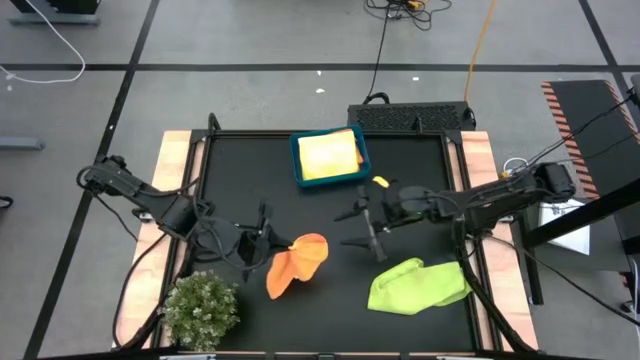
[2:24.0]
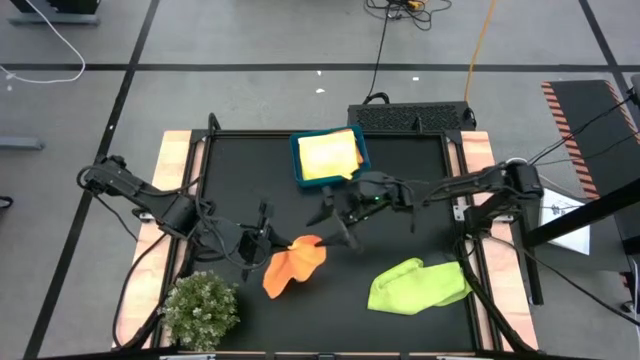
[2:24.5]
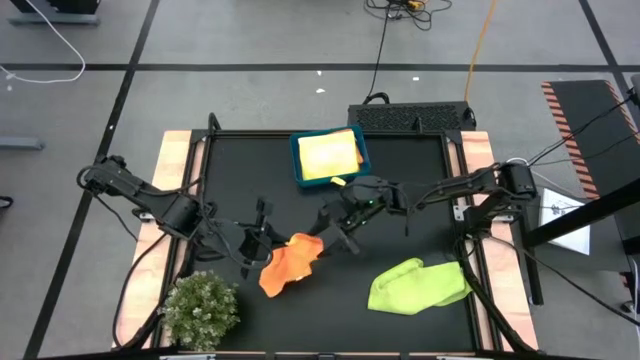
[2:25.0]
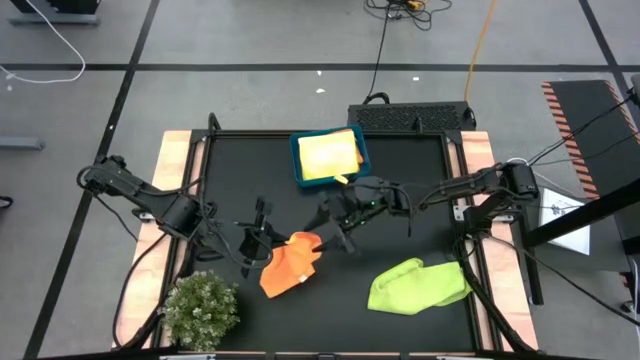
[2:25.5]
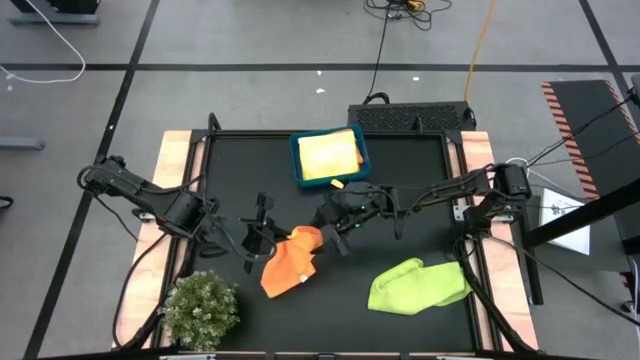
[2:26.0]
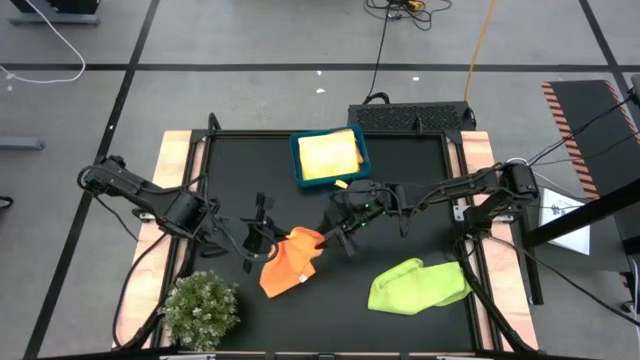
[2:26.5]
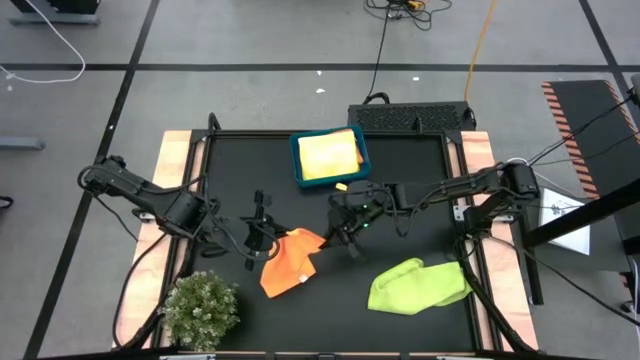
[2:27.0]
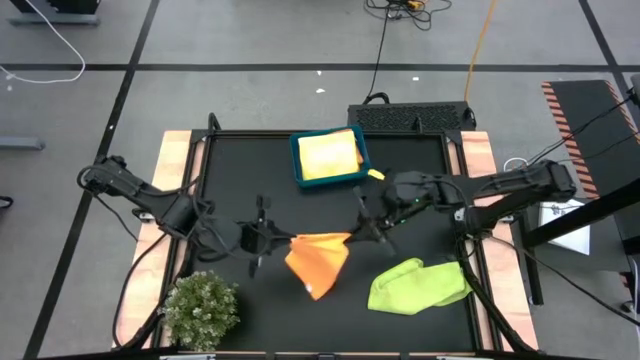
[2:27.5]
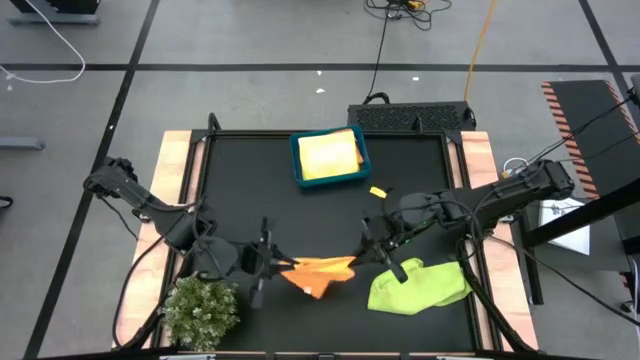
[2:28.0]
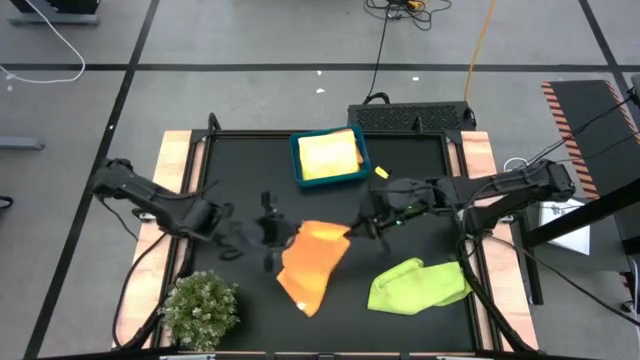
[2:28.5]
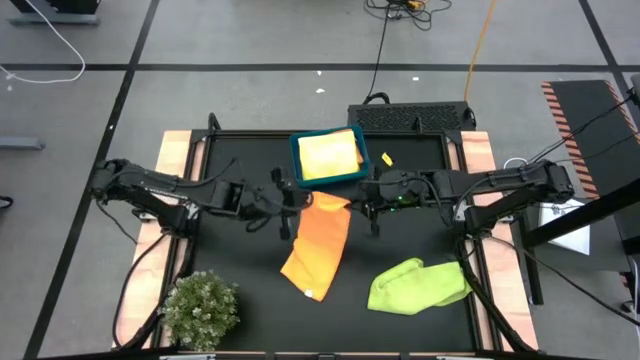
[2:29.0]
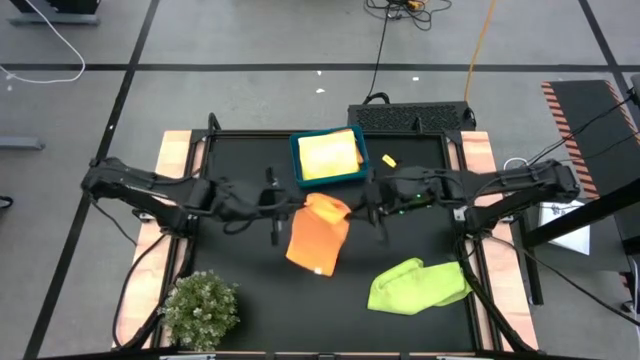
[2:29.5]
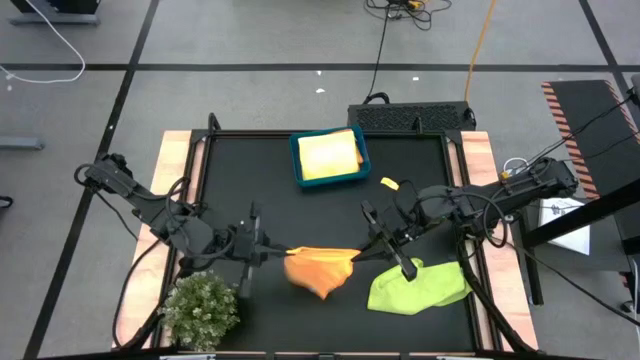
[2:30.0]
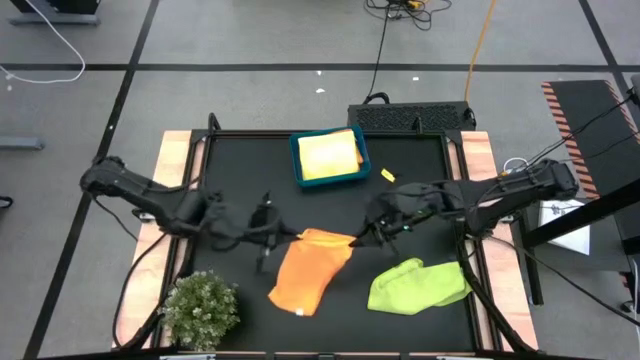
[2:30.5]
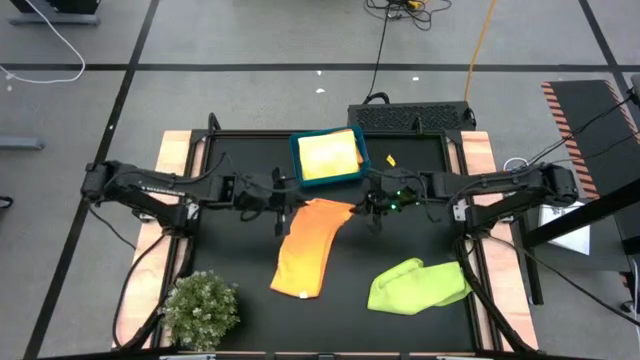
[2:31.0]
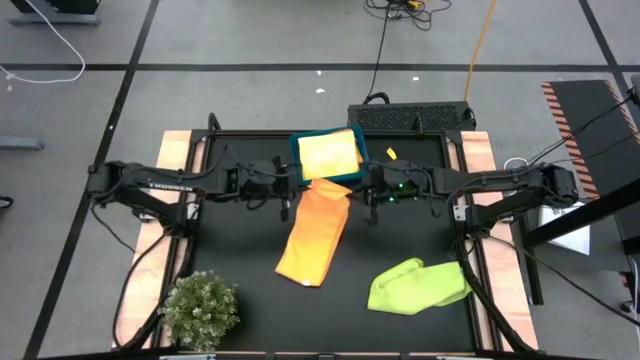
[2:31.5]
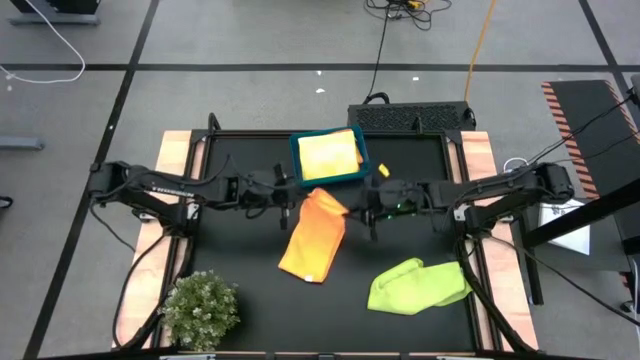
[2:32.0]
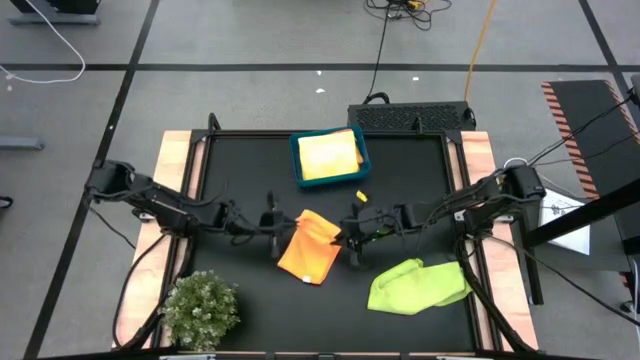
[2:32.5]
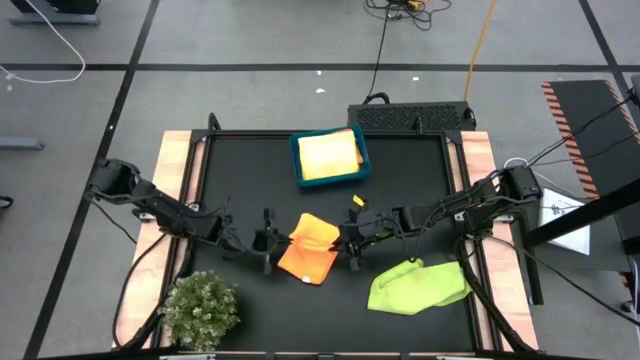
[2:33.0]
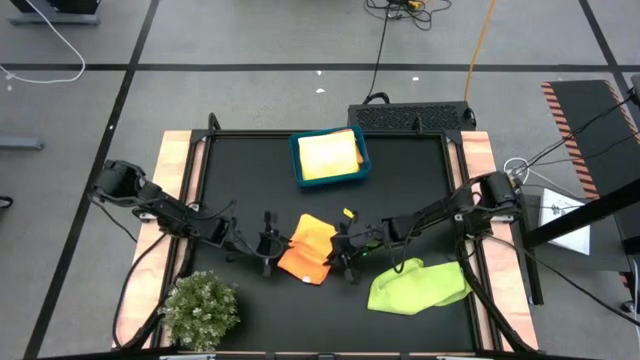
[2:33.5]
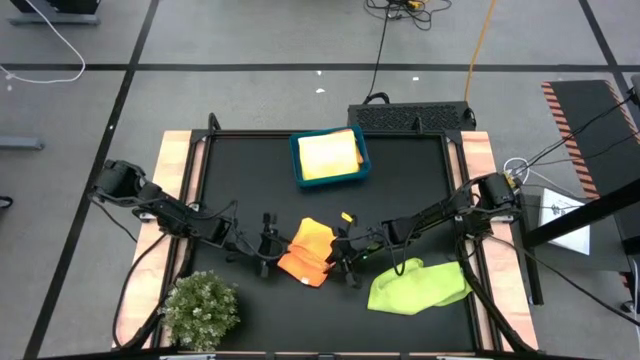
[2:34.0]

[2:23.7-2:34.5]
Task: Fold microfiber towels
Fold the orange microfiber towel

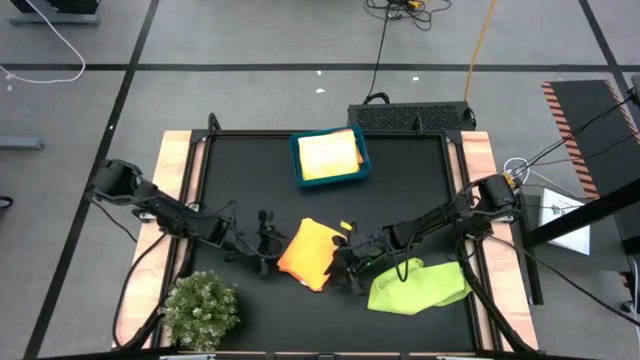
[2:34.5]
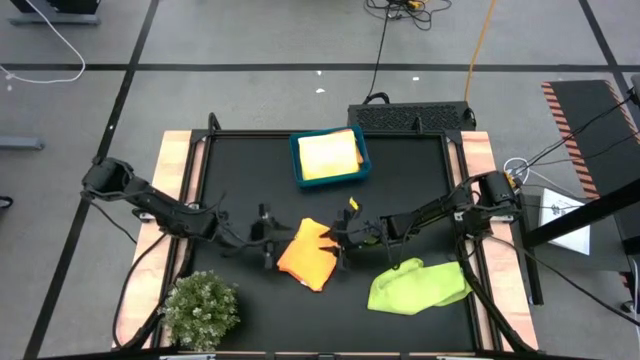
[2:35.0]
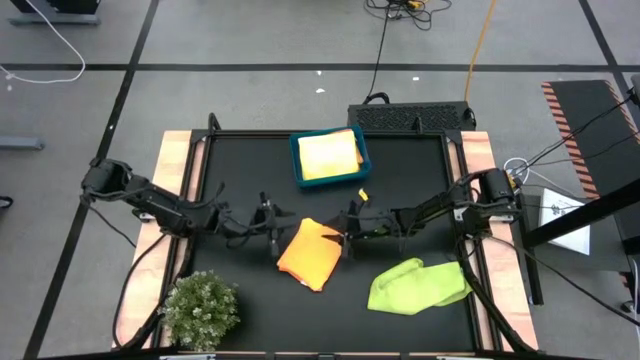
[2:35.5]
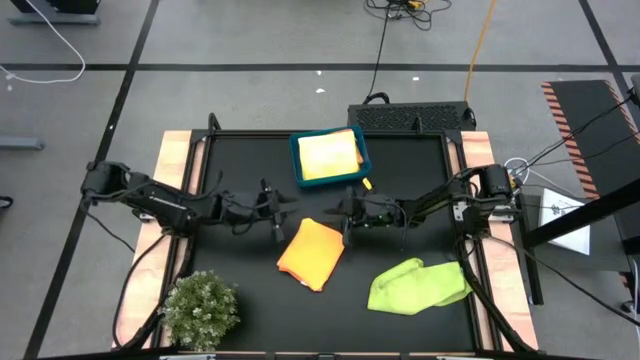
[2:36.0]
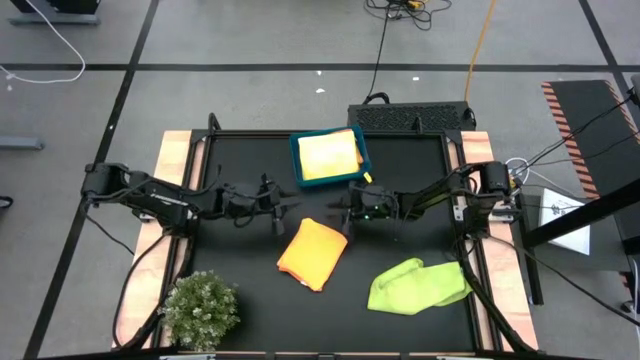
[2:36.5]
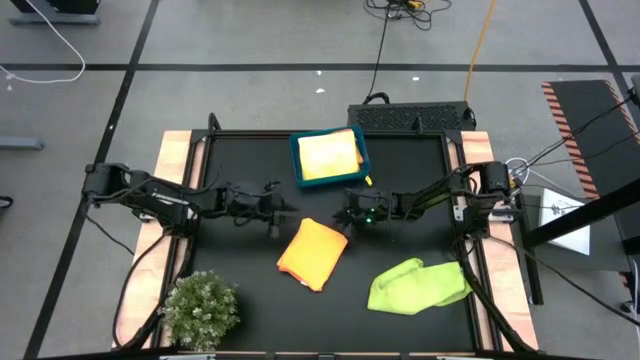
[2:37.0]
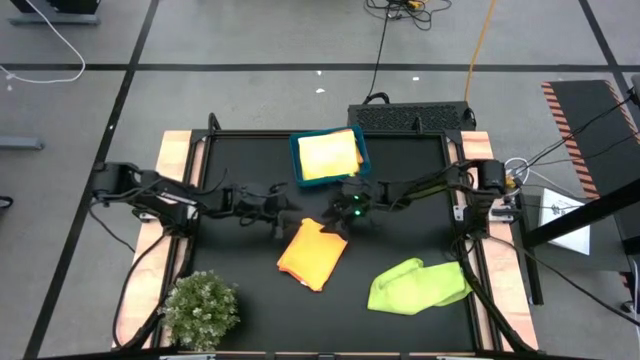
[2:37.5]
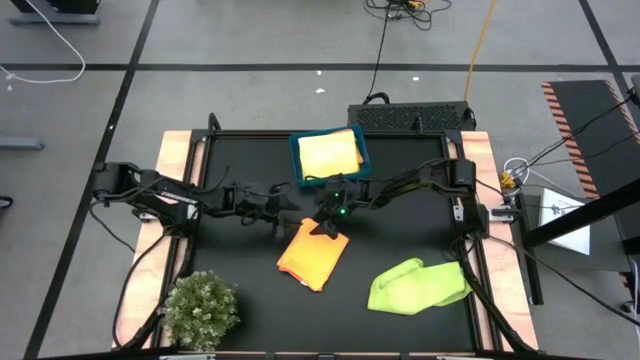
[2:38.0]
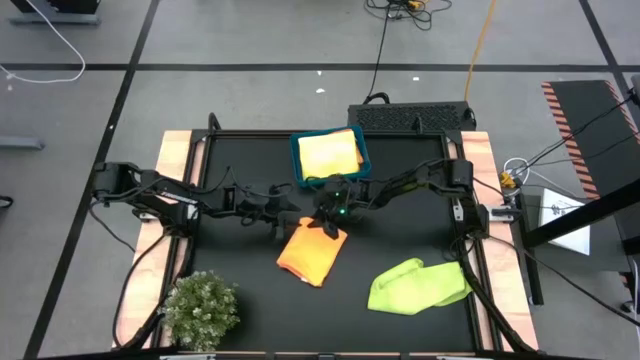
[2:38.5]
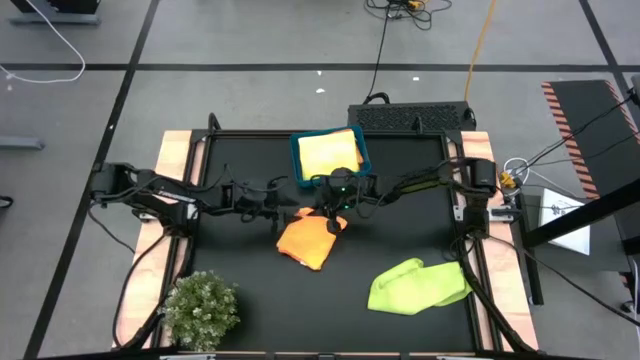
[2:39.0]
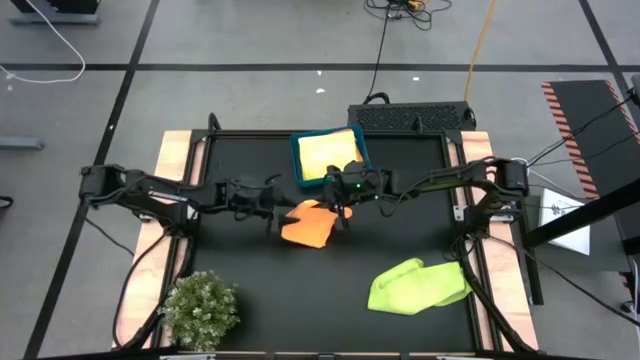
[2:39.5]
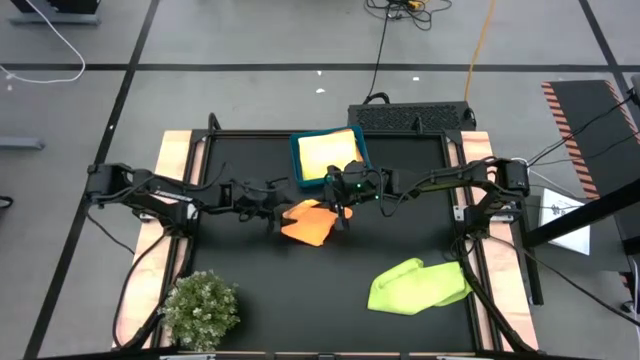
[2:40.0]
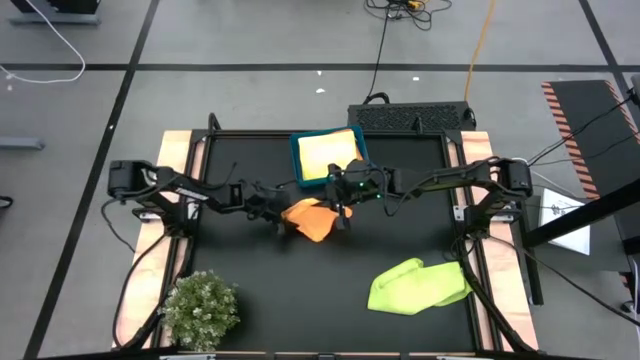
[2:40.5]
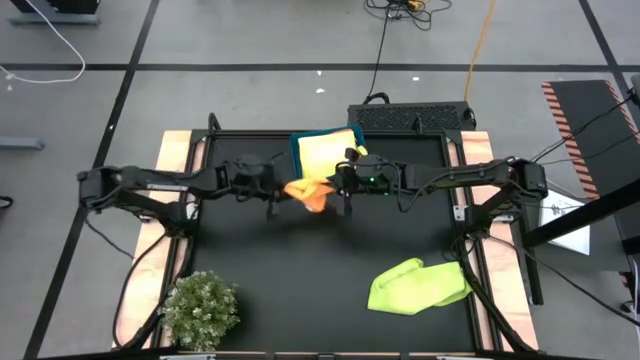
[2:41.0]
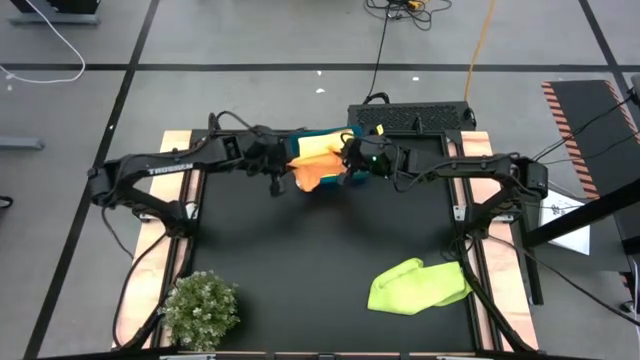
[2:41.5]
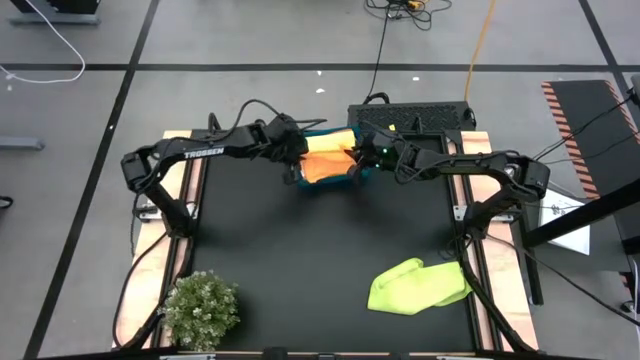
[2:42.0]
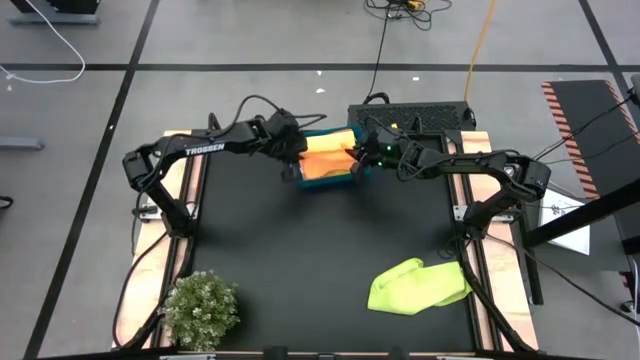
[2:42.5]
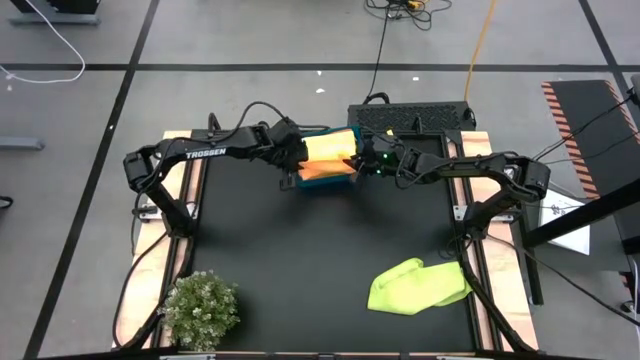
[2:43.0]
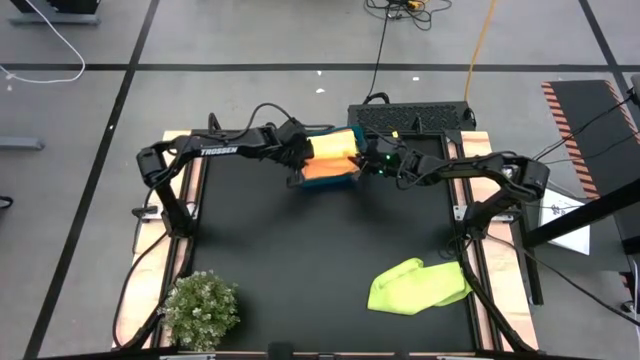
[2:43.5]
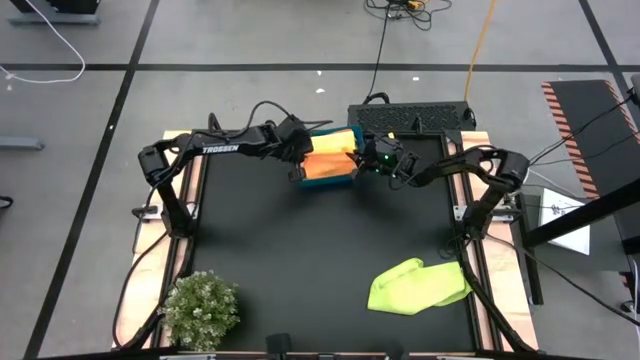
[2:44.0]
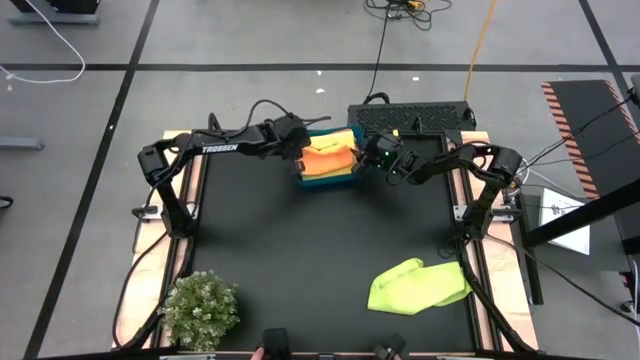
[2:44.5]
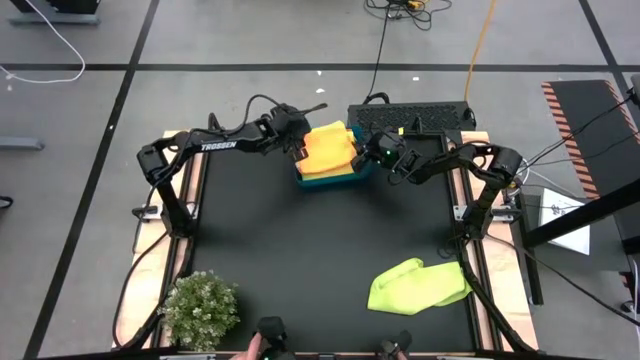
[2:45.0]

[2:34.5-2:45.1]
Put the orange microfiber towel into the blue bin
